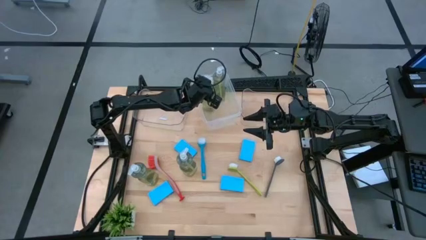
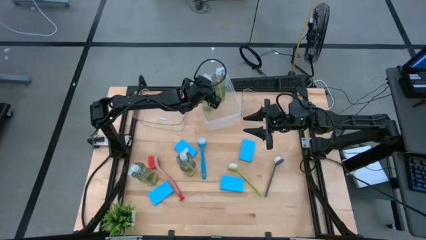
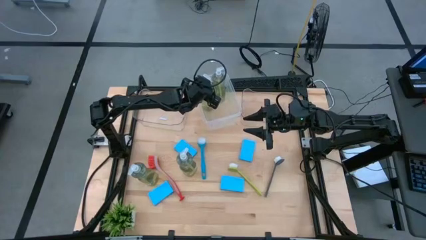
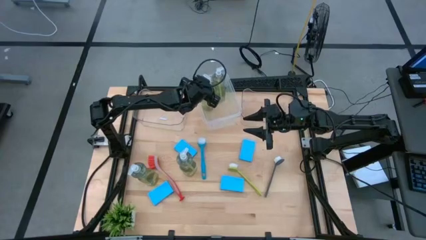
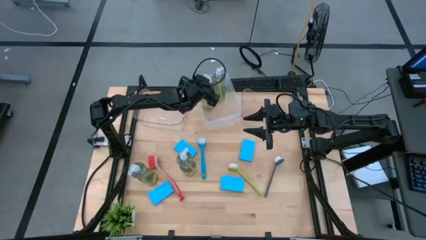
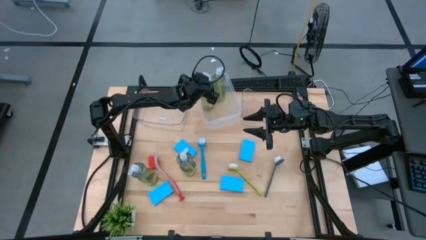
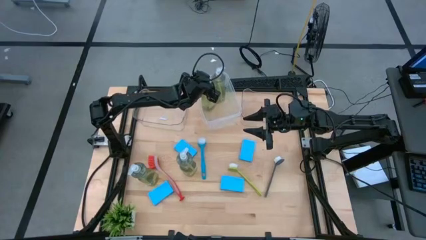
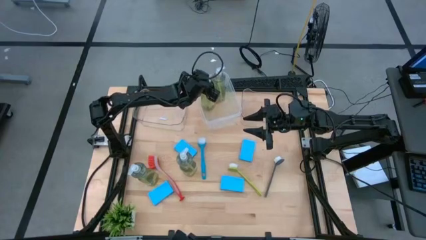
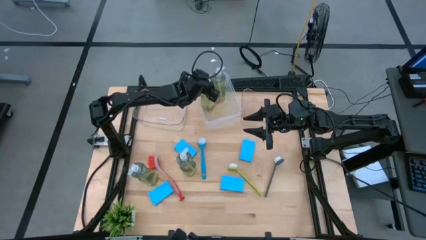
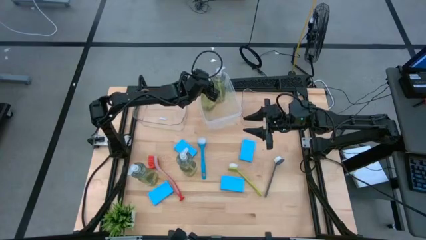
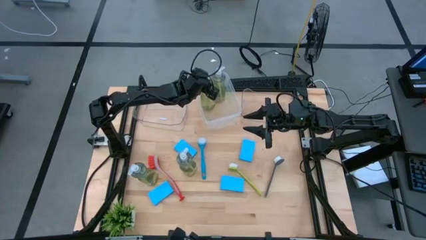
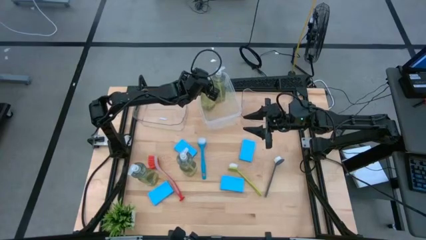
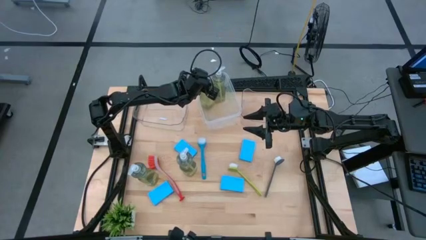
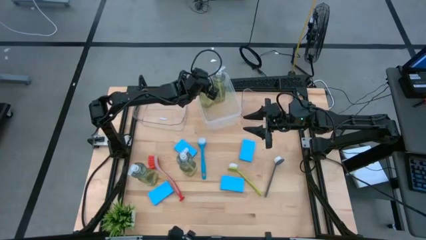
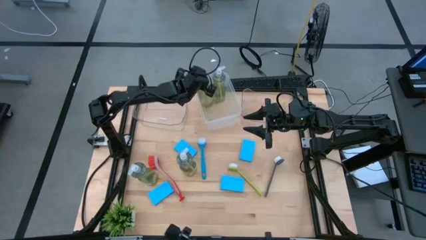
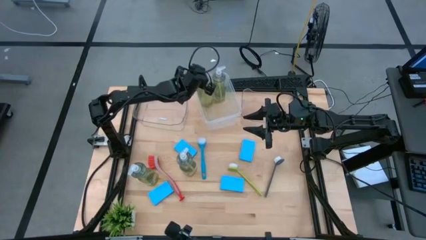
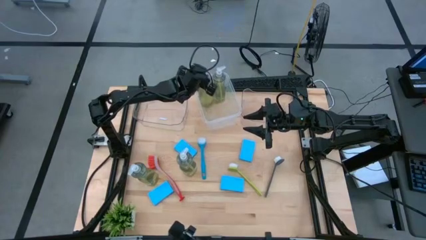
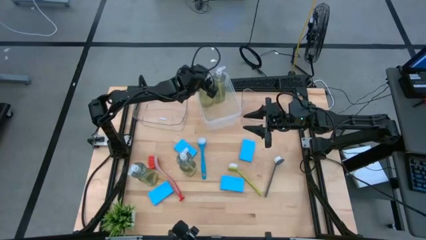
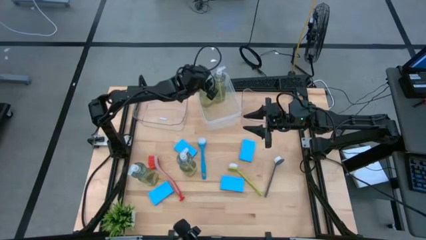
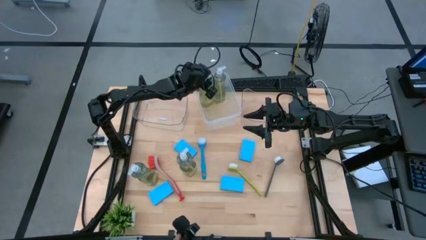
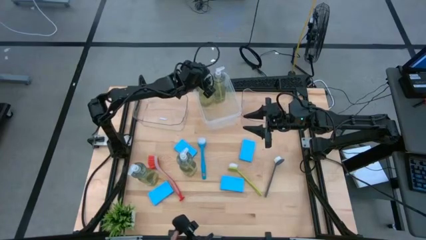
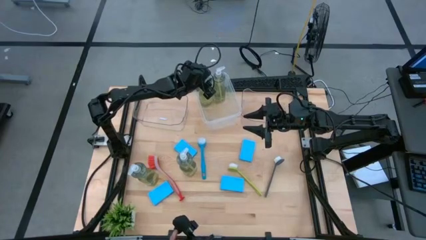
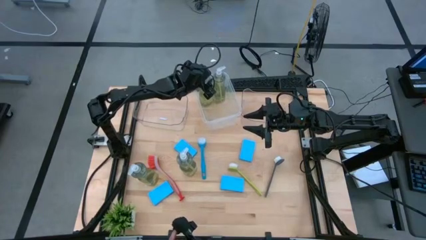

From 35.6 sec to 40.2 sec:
Task: Pick & Place Kitchen Sink Supplies
Put the yellow soap dispenser into the white bin

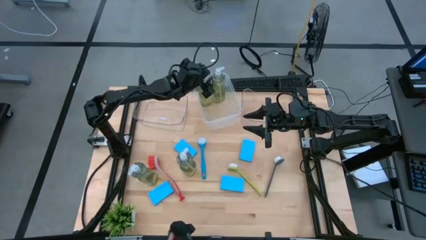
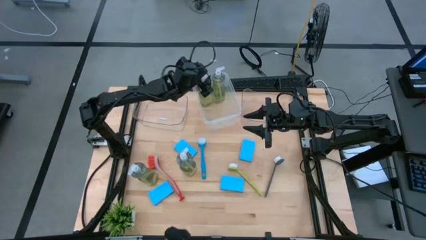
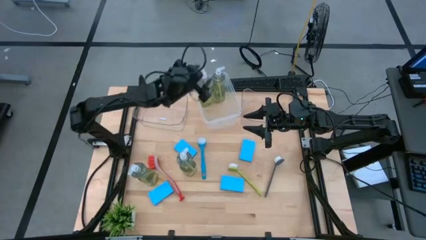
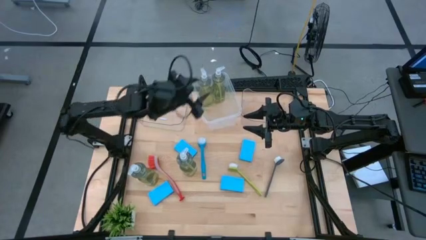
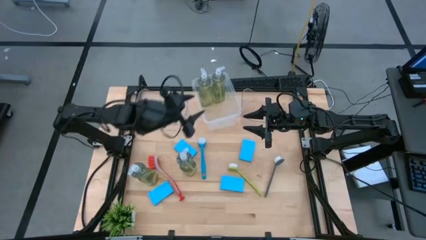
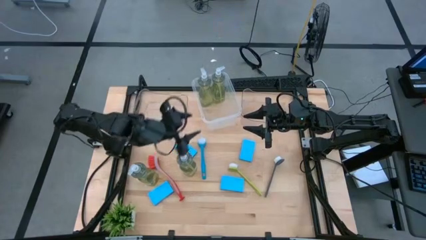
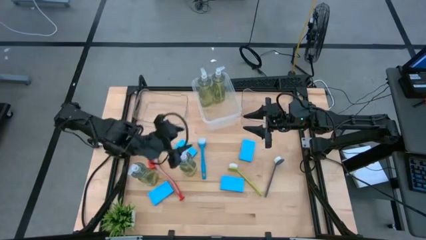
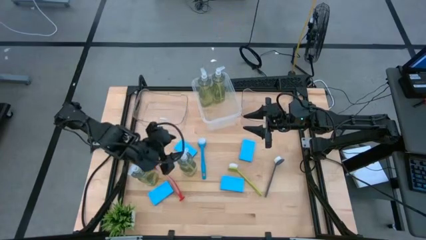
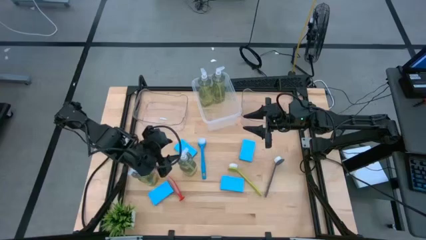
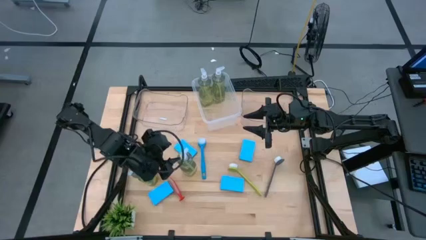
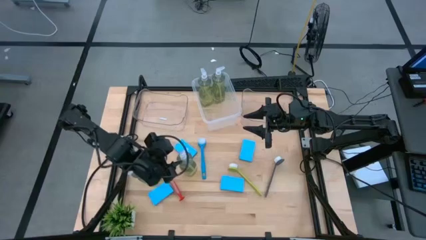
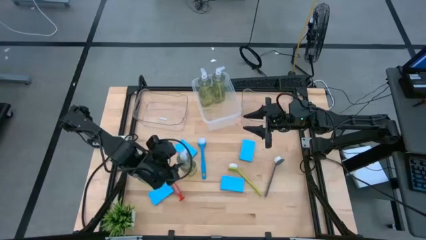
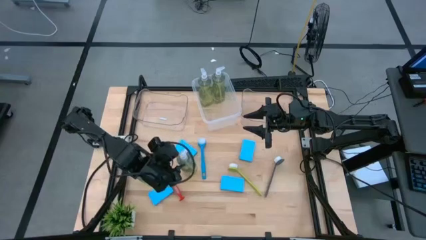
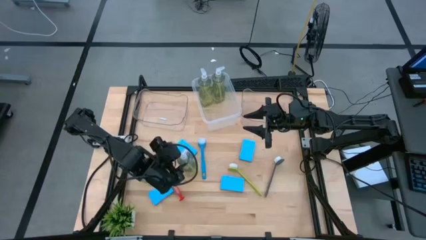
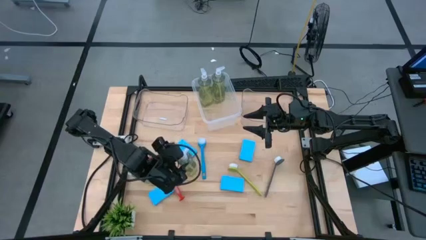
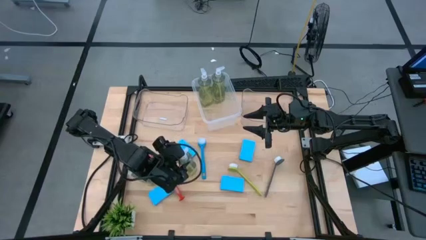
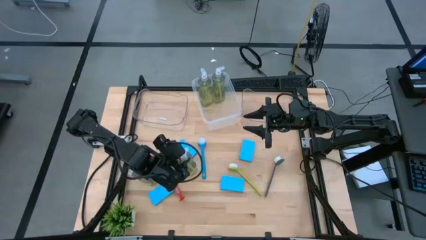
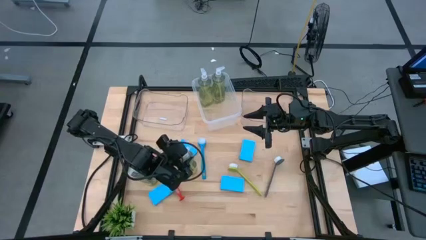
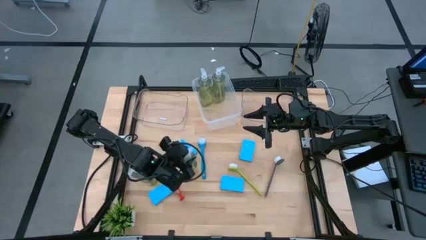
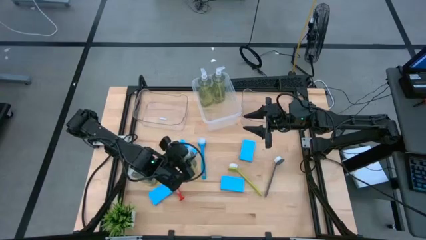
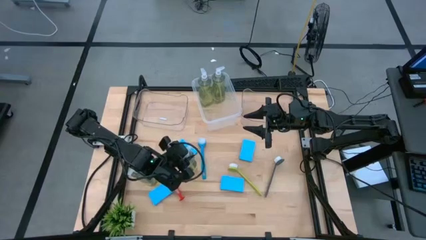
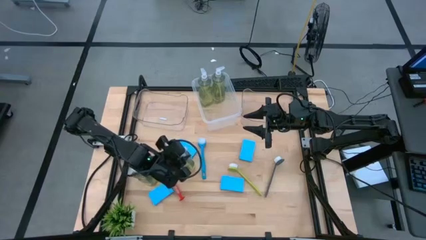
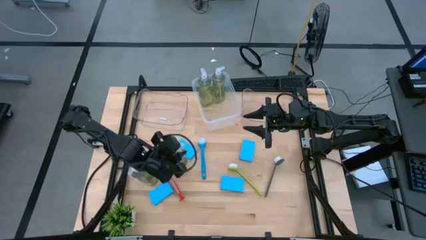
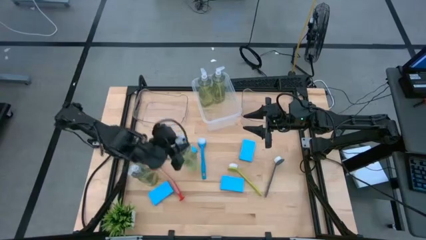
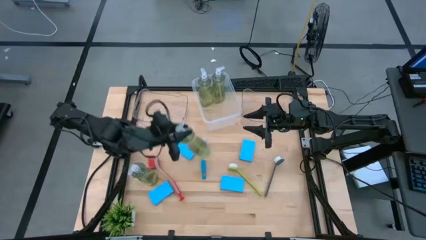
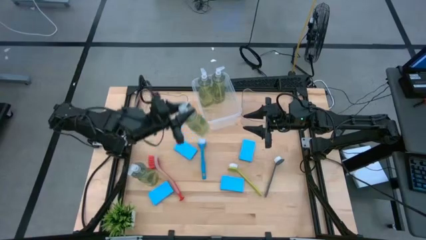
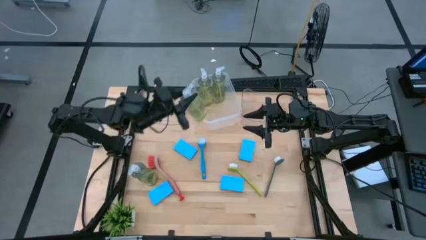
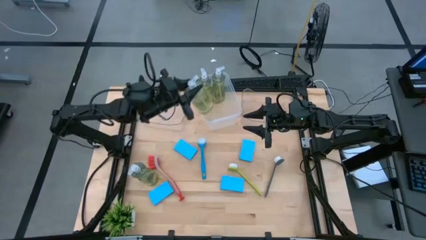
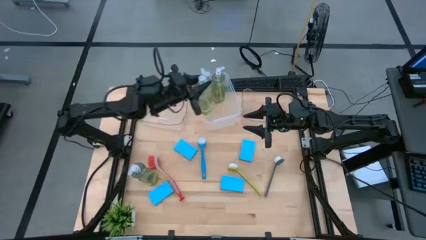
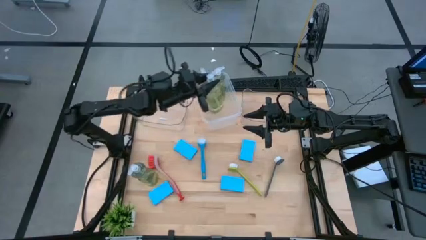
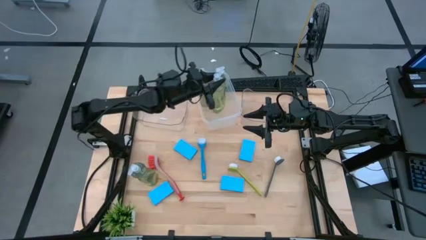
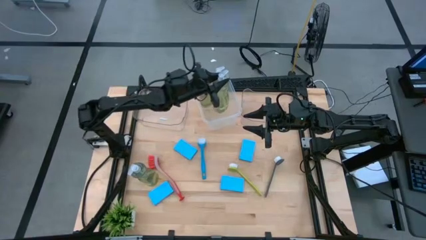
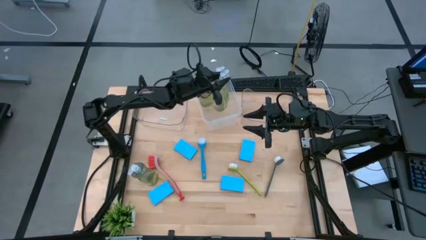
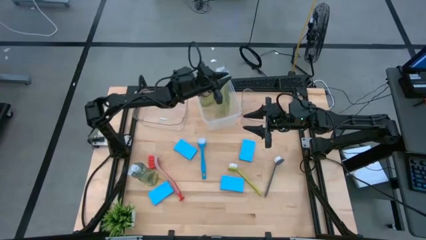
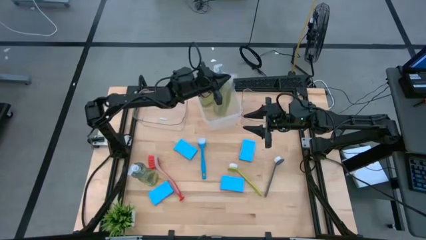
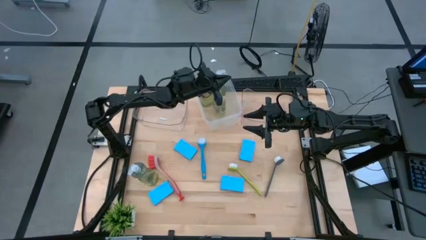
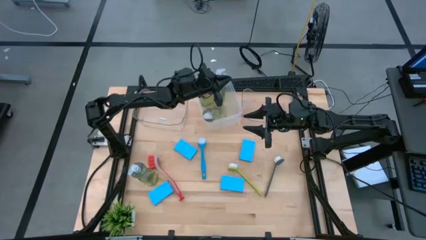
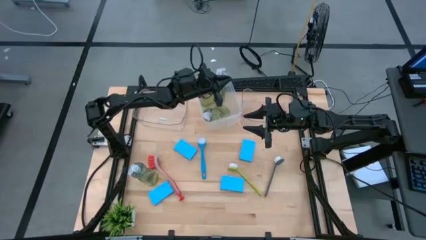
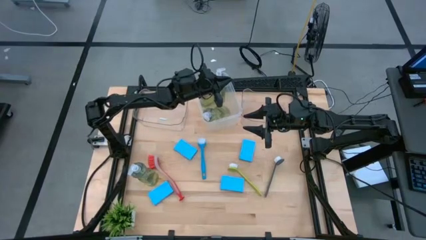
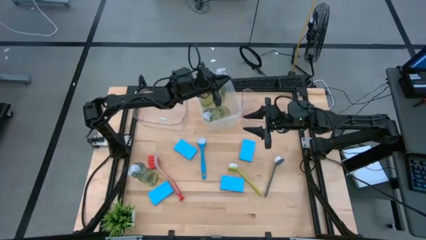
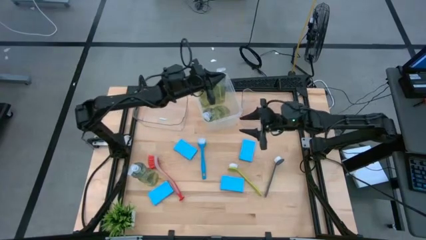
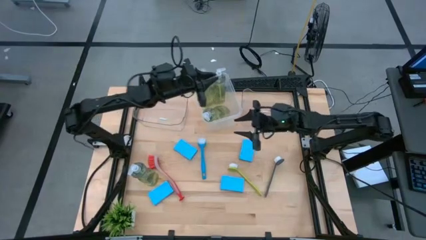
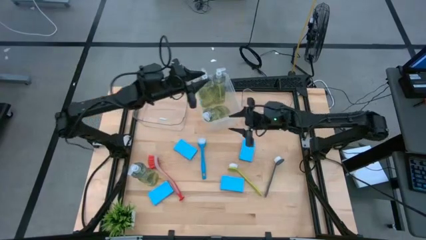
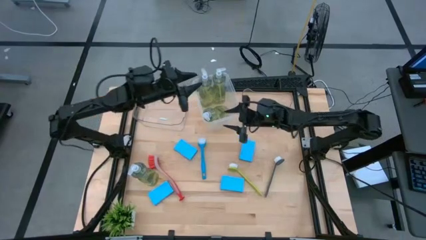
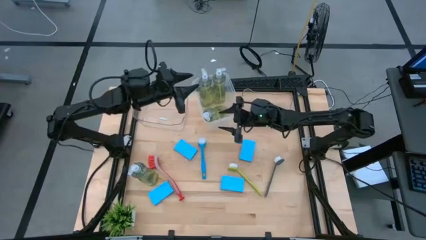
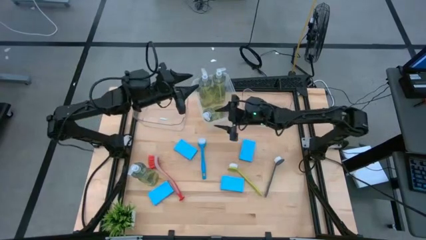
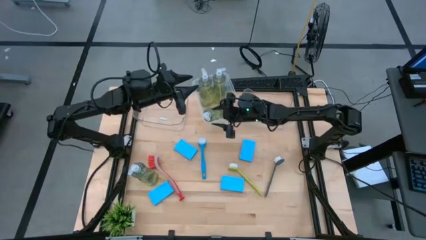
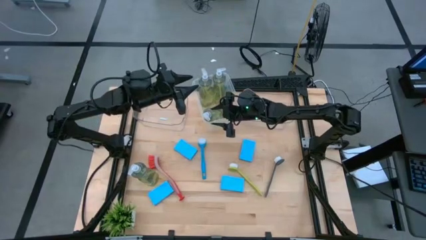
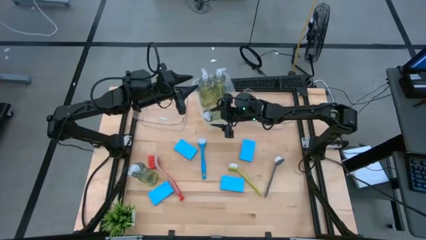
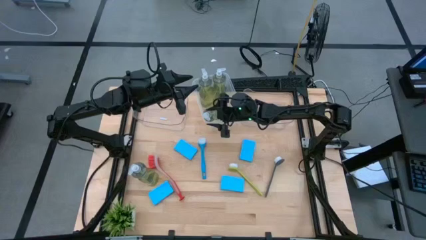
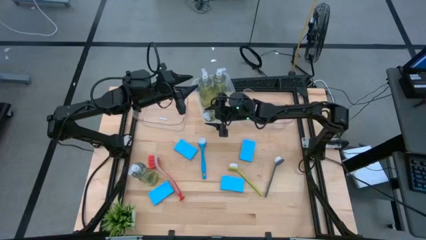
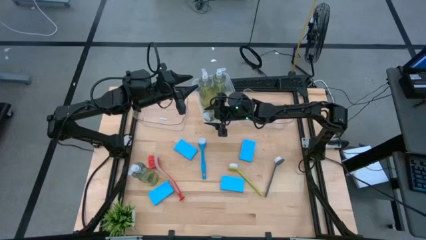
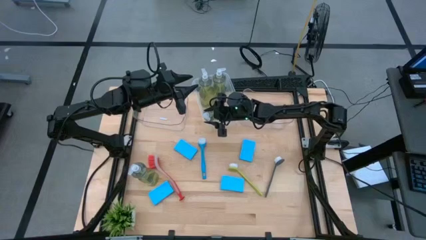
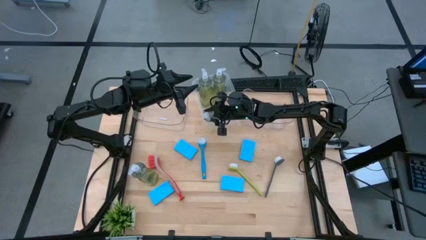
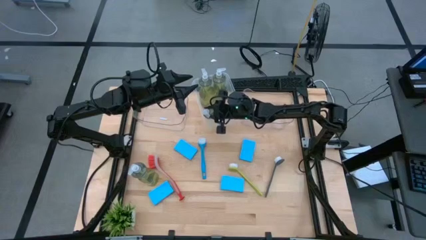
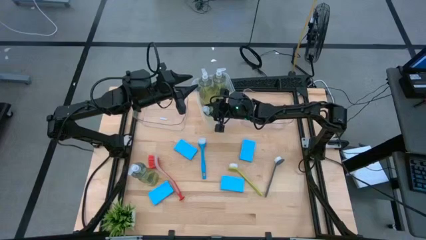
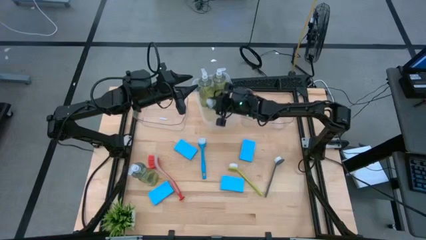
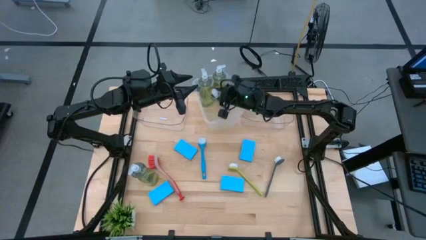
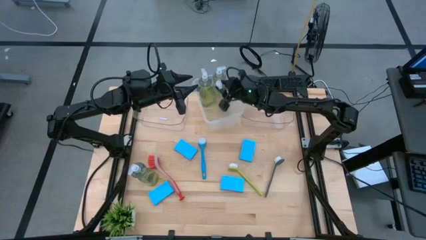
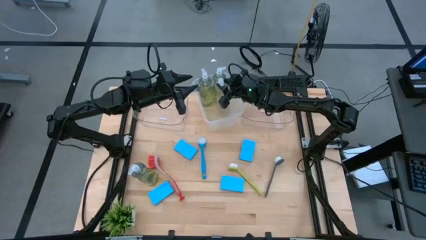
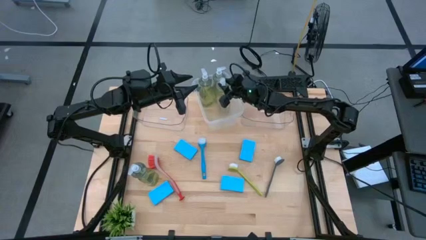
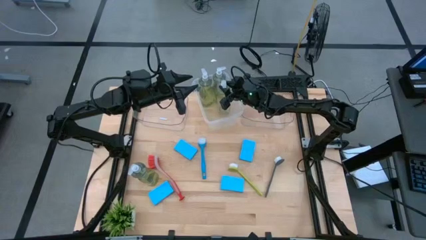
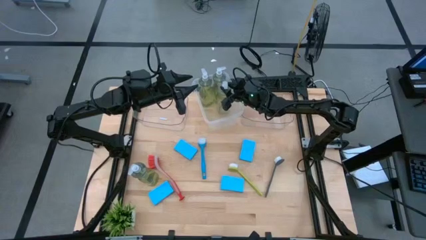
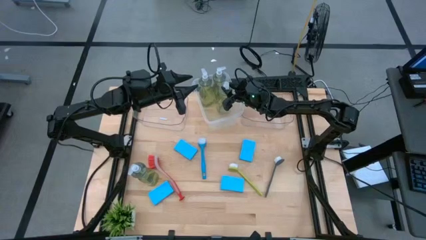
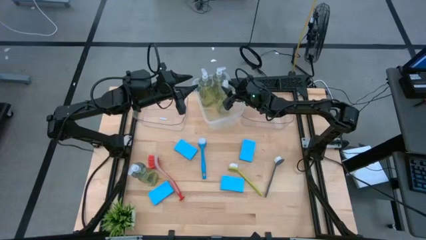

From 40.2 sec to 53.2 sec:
Put the yellow soap dispenser into the white bin
